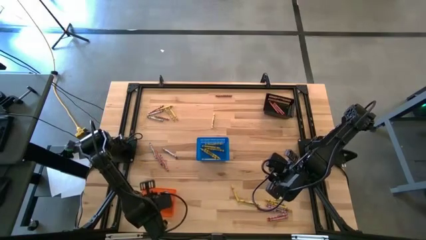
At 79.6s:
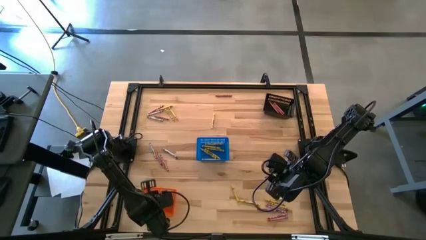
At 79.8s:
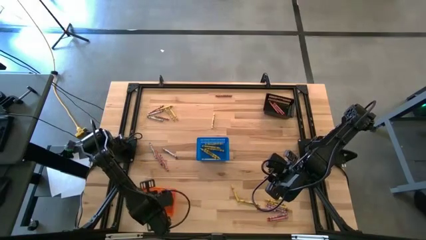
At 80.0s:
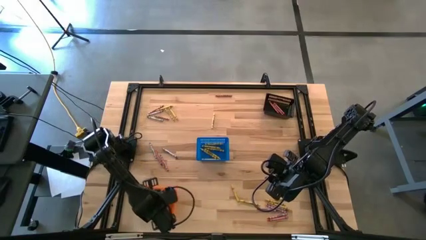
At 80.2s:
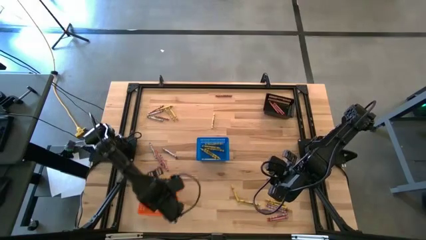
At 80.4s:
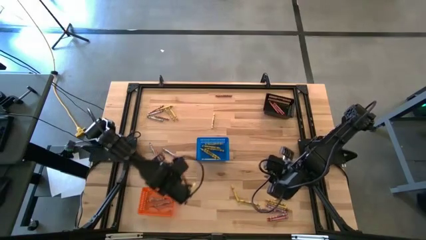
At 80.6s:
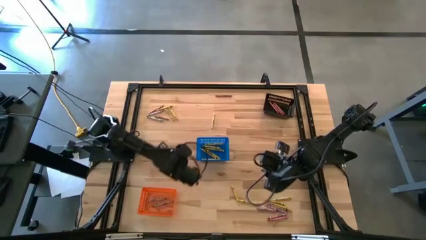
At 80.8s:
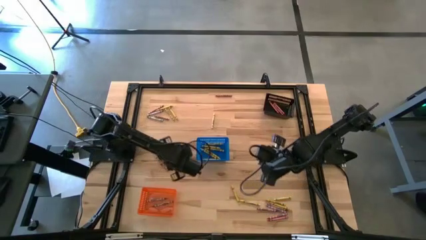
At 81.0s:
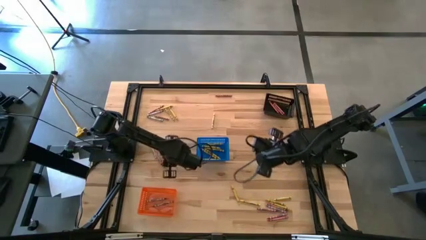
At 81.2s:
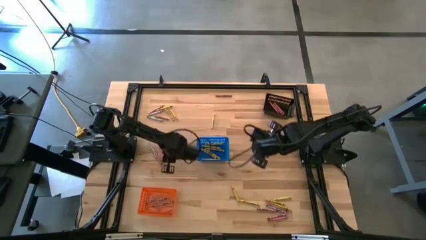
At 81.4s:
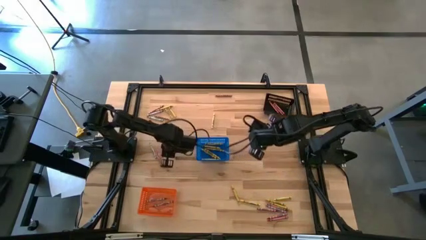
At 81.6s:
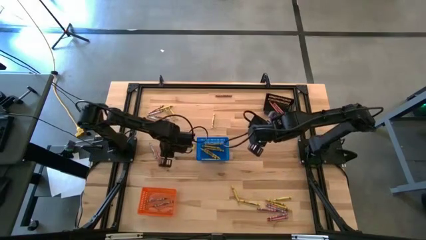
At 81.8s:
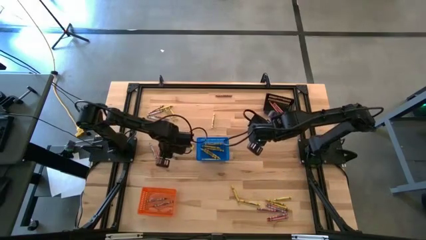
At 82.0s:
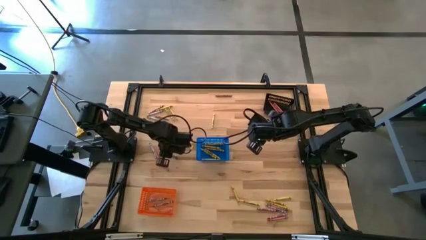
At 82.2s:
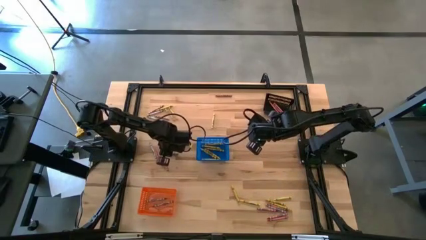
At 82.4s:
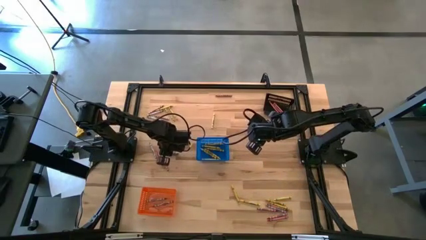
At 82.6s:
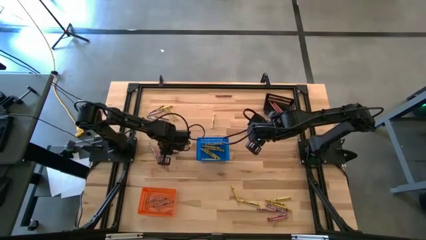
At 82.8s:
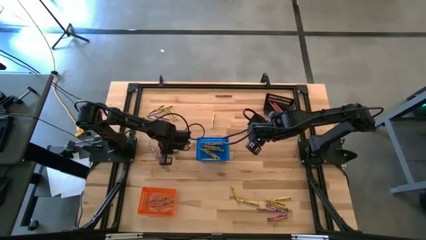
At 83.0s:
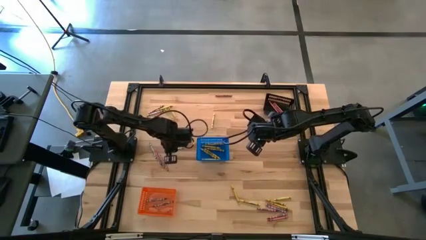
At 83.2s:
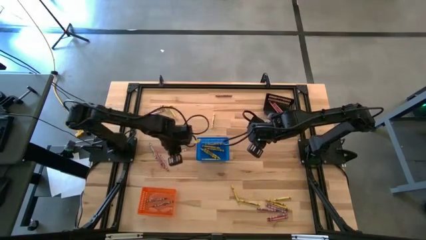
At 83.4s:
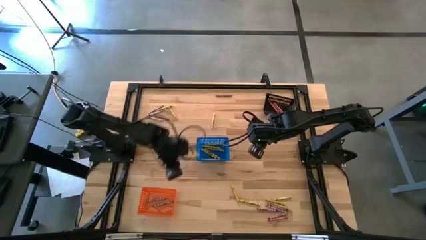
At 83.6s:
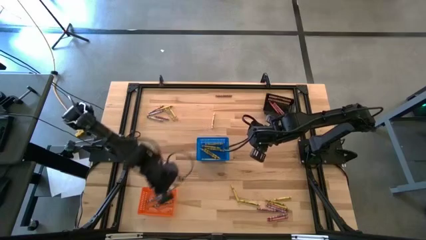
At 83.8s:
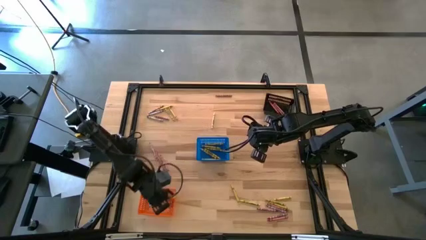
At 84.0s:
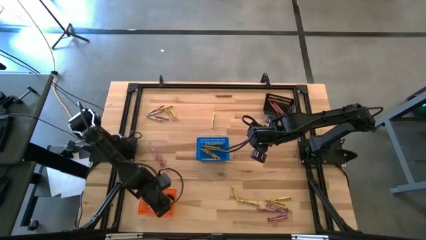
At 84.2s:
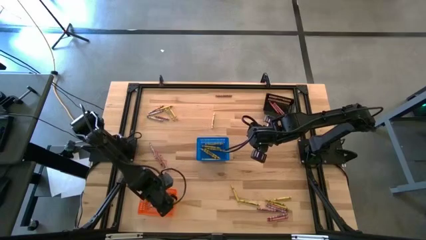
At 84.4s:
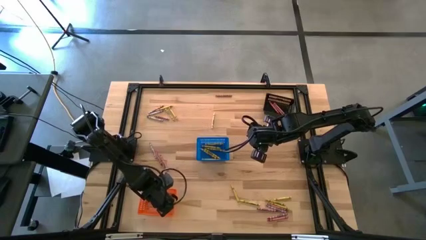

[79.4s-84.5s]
Task: Sort crayons
Put the gray crayon into the orange basket

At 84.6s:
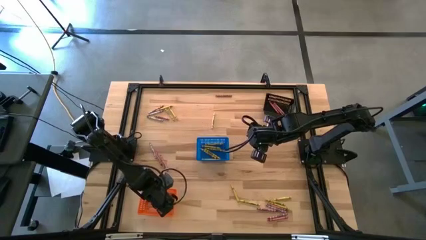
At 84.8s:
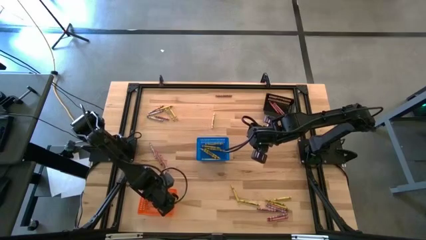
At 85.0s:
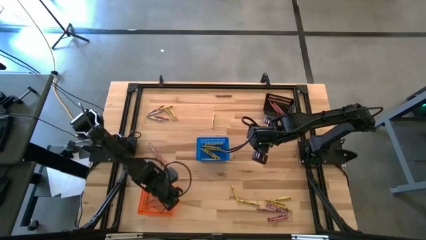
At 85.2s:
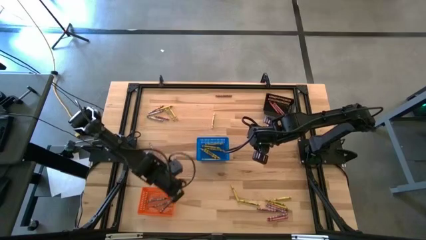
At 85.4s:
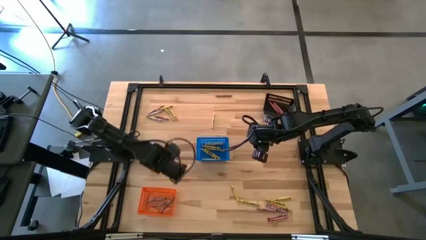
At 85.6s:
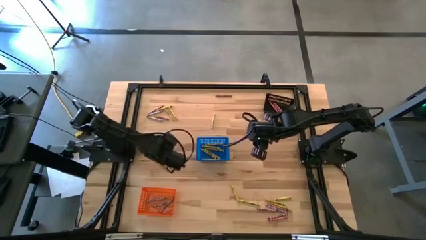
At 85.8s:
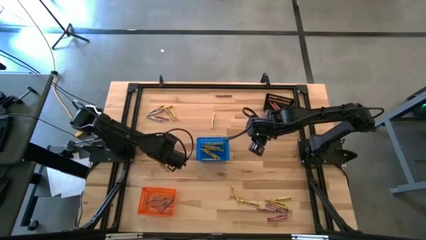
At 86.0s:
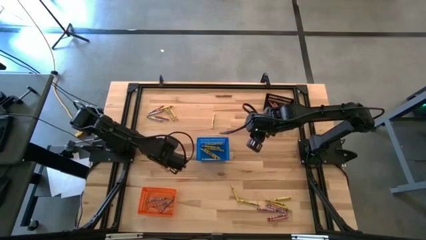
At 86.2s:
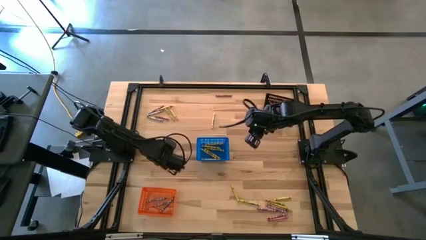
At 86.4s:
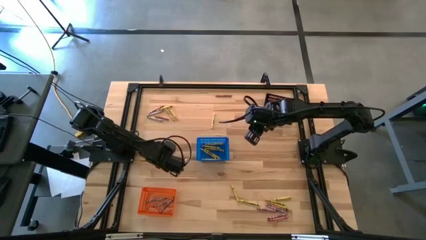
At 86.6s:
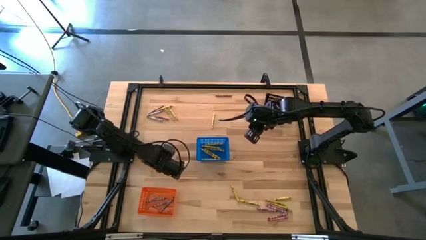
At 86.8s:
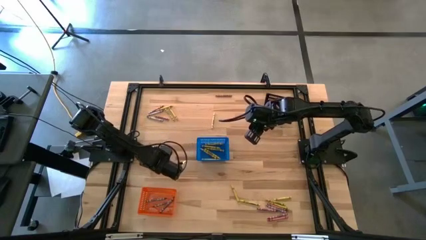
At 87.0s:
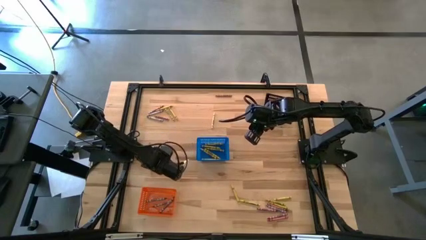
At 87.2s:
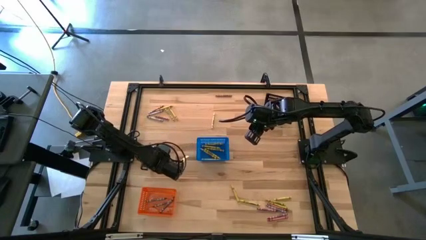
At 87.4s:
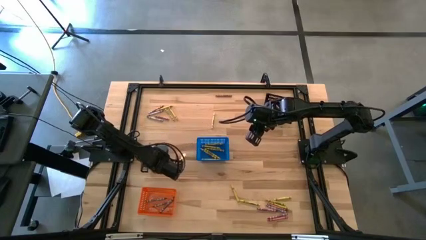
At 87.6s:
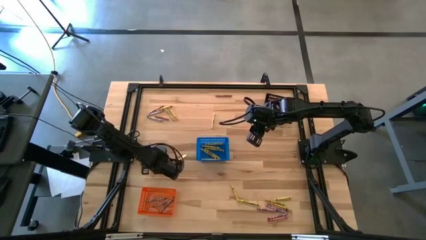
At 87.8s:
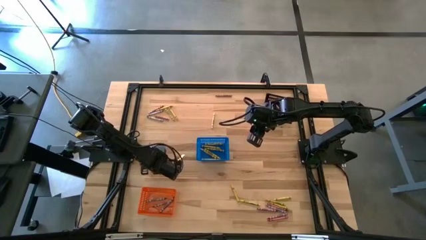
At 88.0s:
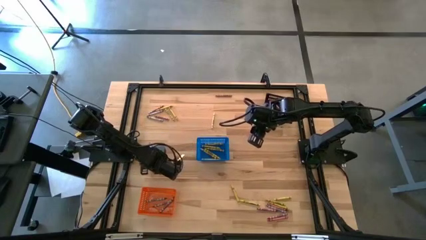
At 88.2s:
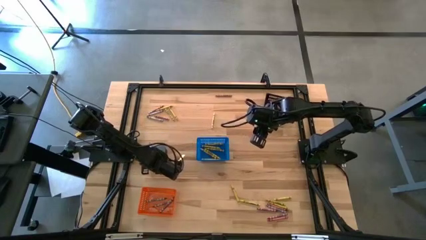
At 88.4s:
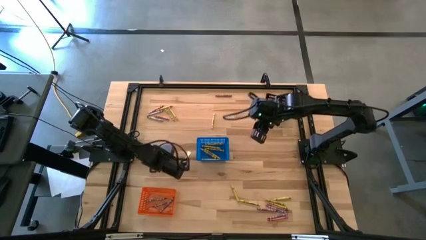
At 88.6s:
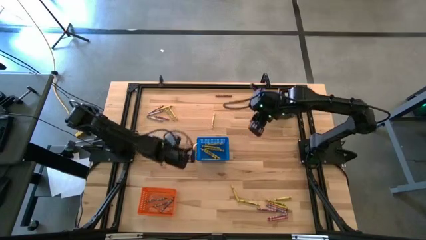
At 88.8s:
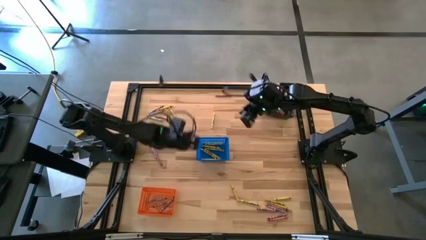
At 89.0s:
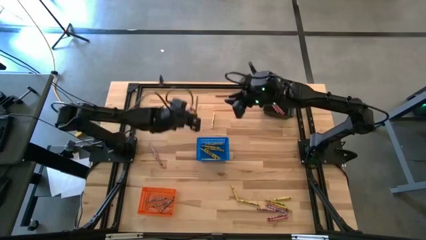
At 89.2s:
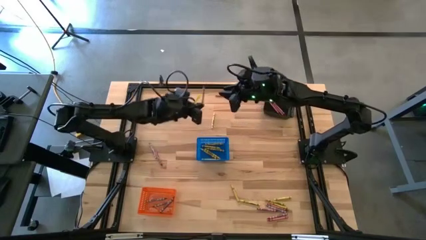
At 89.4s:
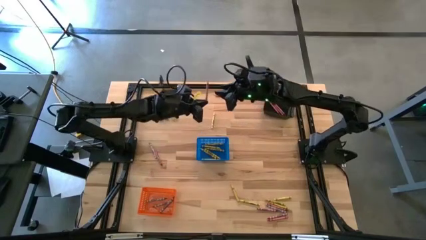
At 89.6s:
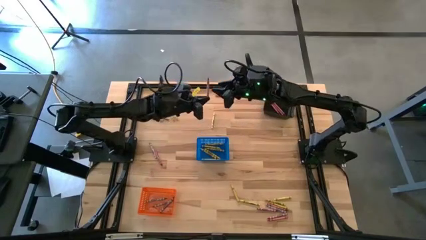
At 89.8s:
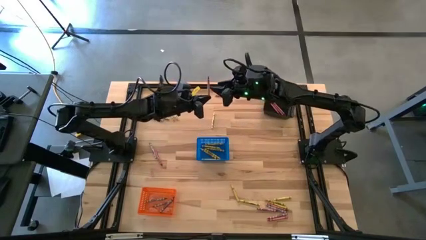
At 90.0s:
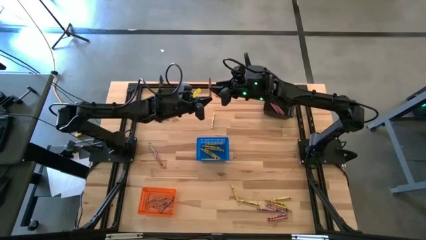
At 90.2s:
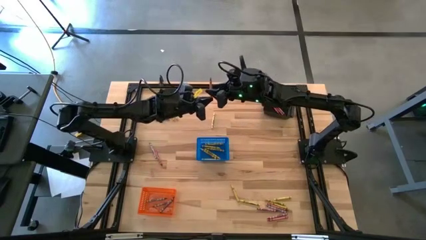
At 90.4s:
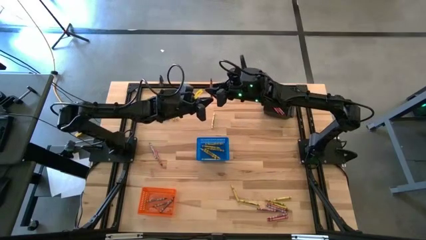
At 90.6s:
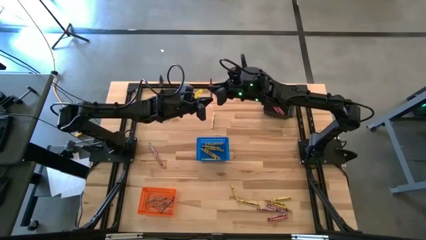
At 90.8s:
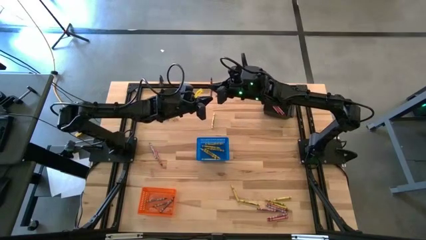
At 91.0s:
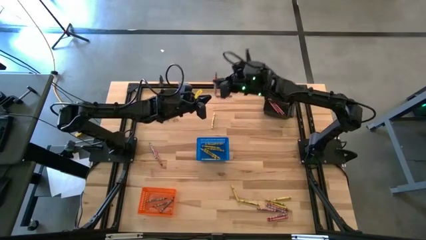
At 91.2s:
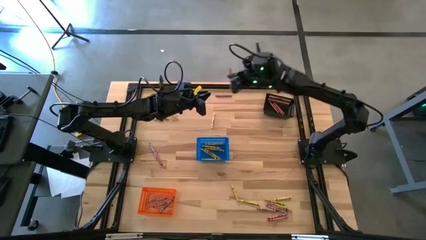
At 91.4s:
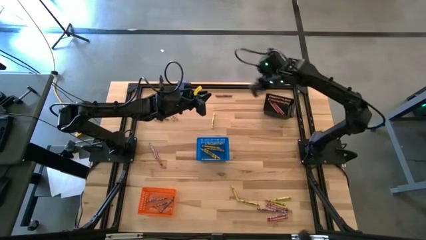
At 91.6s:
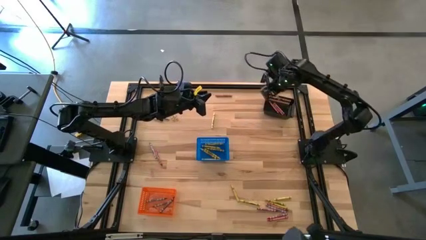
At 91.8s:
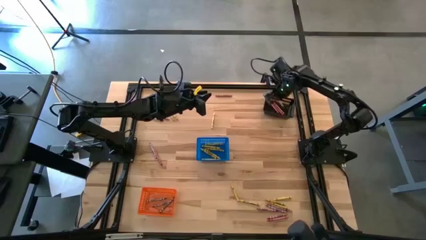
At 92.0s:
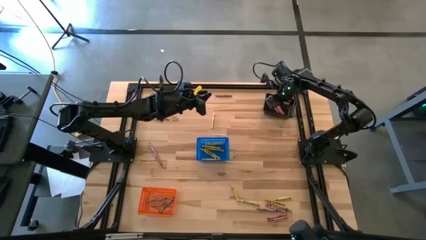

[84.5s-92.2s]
Put the red crayon into the black basket

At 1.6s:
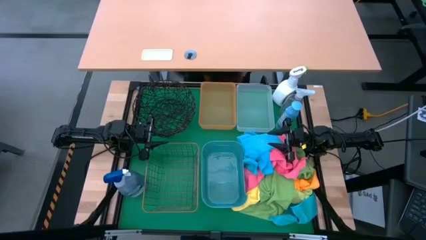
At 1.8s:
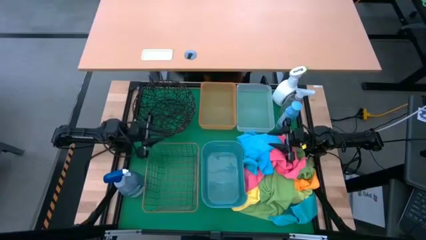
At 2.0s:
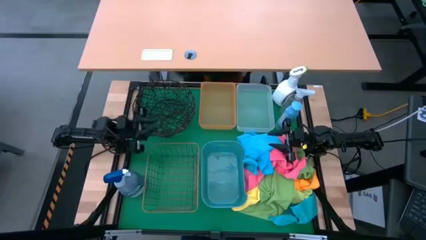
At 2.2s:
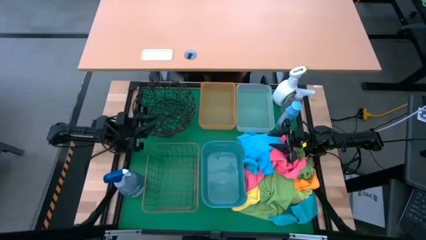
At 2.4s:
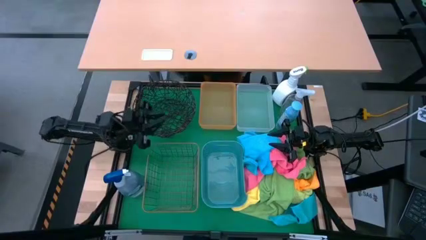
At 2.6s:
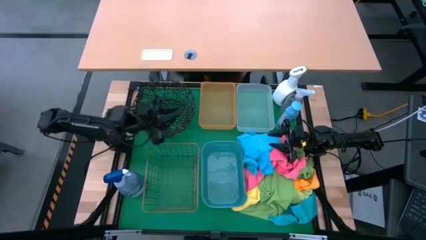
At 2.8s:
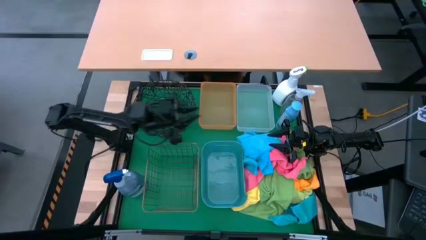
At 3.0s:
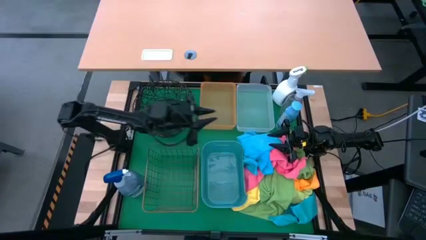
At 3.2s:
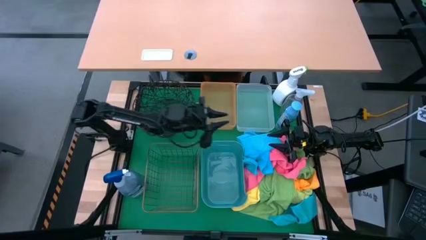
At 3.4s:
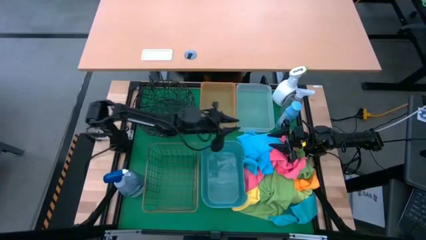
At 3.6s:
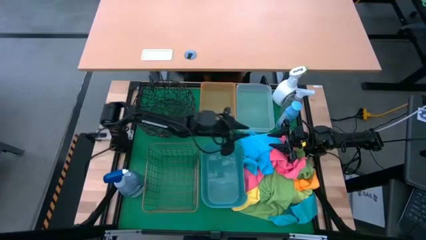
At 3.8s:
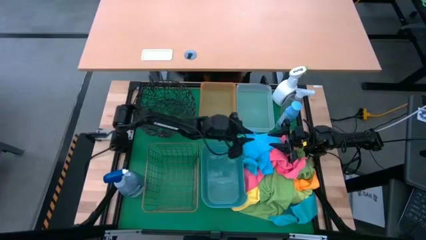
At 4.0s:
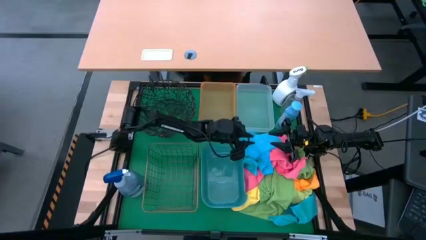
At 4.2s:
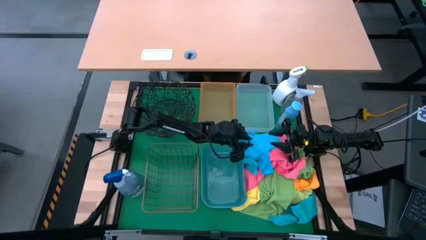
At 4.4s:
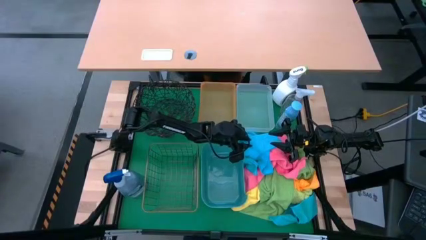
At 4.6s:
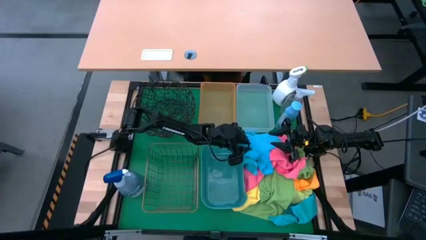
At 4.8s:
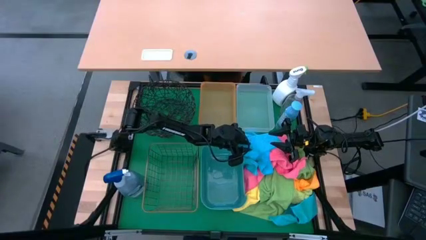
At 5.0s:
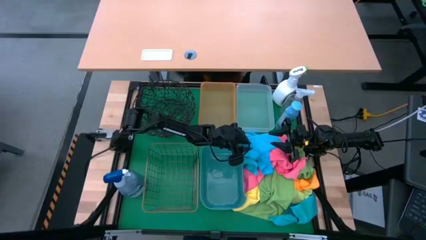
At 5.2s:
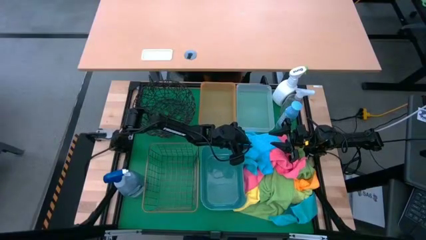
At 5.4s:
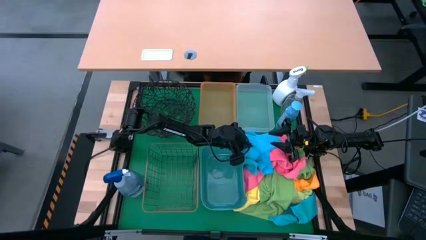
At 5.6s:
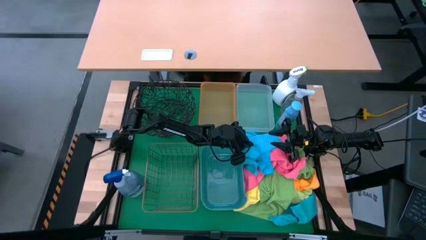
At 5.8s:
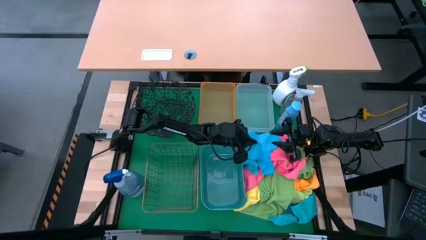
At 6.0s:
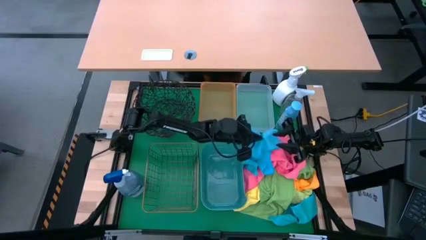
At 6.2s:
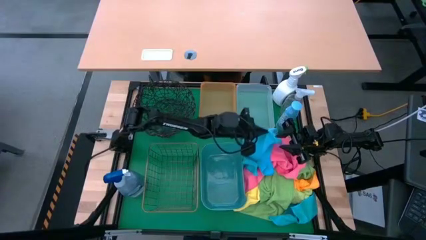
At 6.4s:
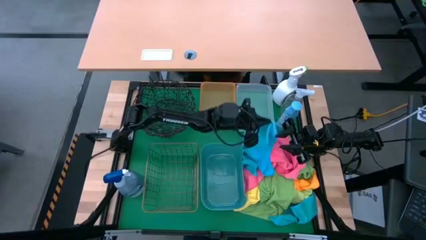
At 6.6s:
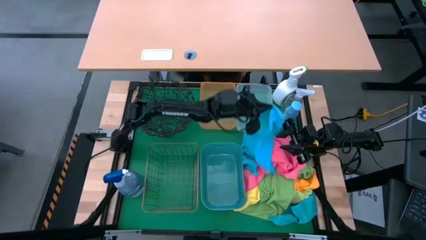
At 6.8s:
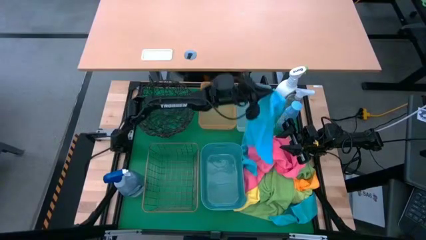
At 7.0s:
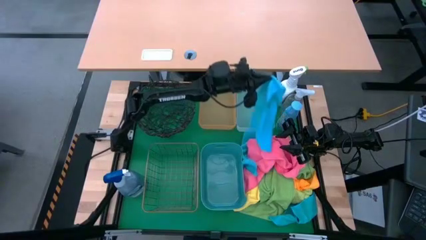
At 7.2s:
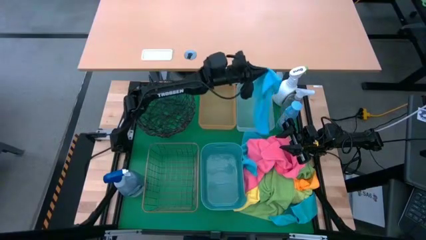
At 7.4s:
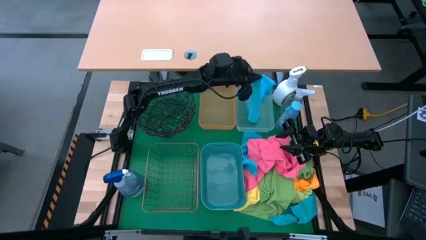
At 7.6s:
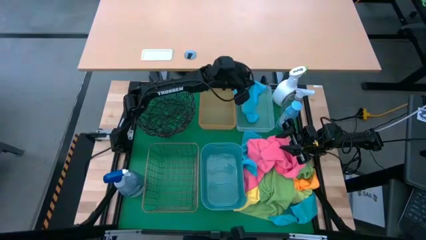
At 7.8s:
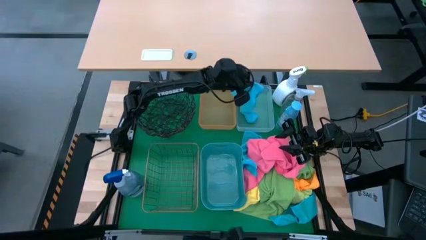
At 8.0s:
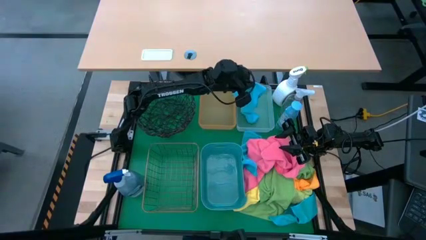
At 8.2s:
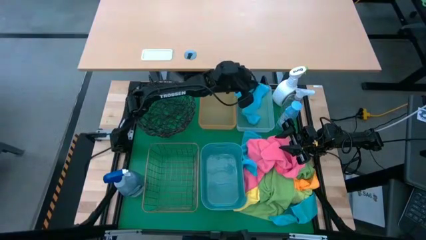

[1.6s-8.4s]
Task: Sort microfiber towel by color & place in baskets
Put the blue towel into the transparent bin
